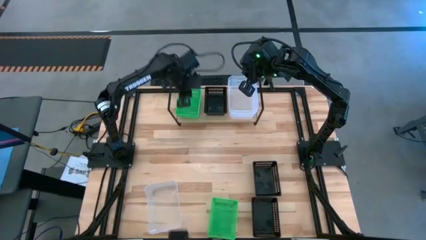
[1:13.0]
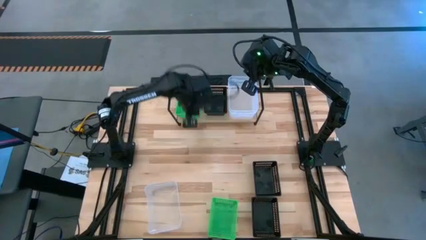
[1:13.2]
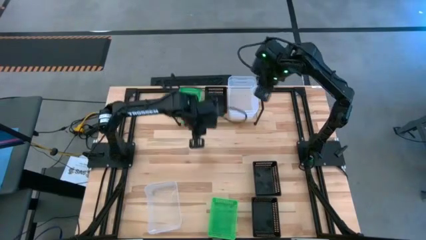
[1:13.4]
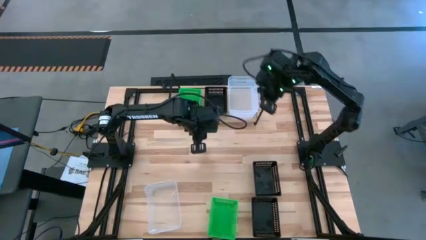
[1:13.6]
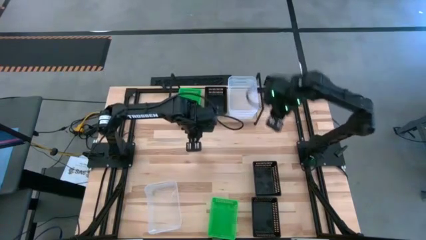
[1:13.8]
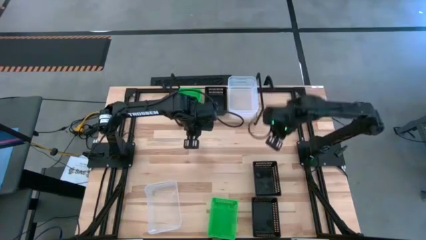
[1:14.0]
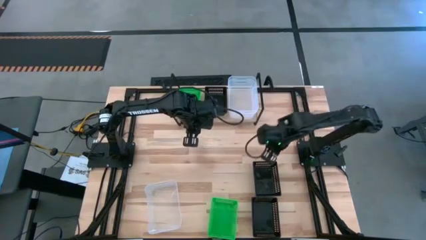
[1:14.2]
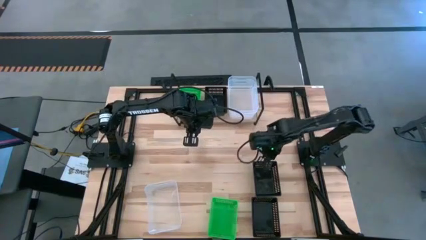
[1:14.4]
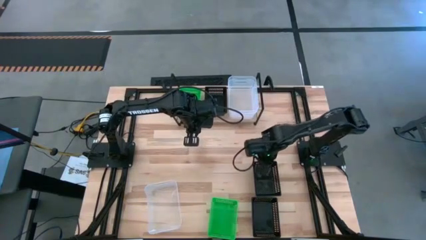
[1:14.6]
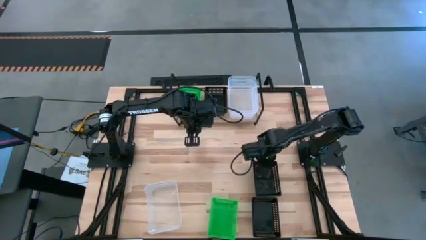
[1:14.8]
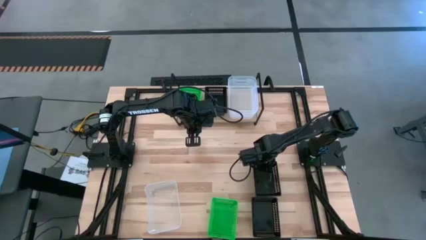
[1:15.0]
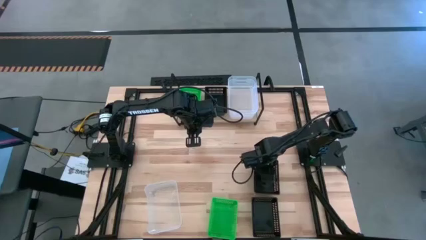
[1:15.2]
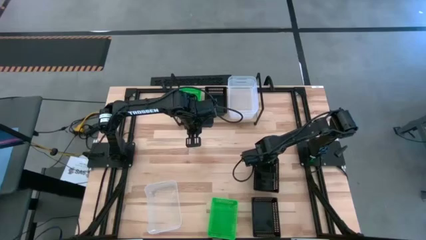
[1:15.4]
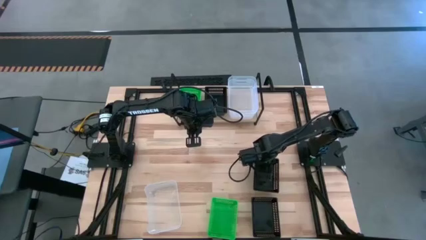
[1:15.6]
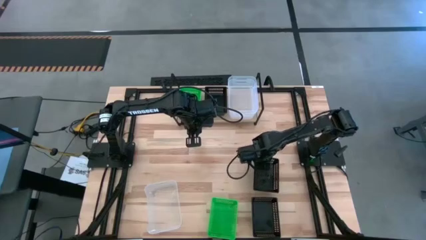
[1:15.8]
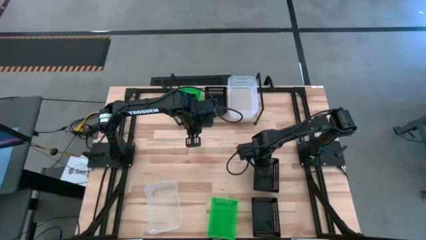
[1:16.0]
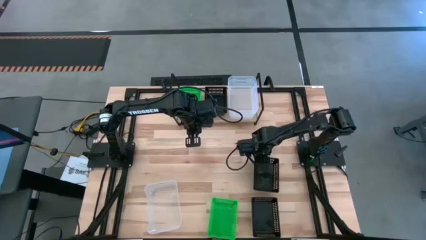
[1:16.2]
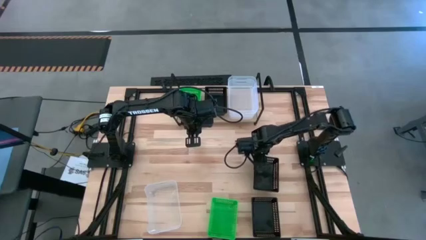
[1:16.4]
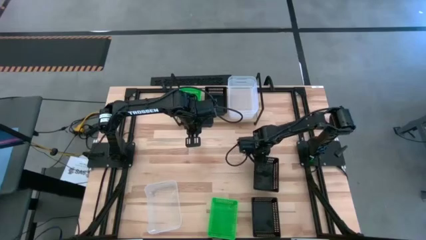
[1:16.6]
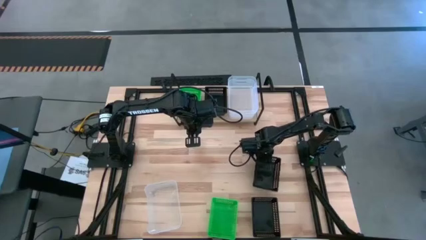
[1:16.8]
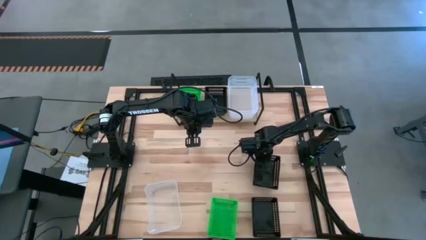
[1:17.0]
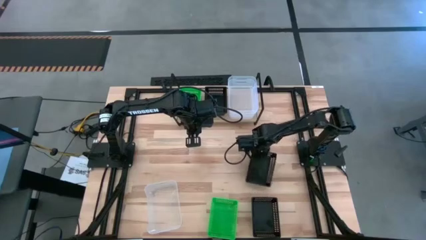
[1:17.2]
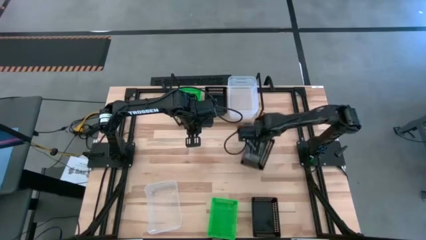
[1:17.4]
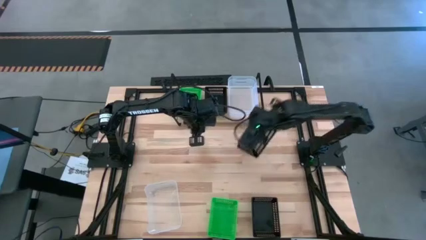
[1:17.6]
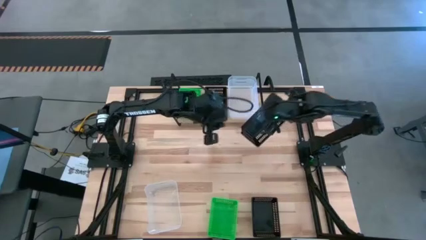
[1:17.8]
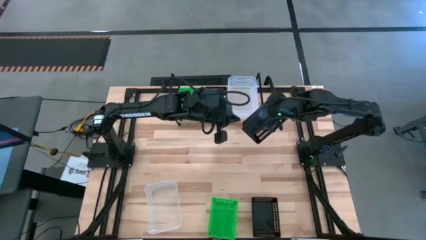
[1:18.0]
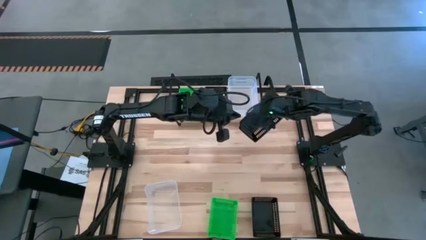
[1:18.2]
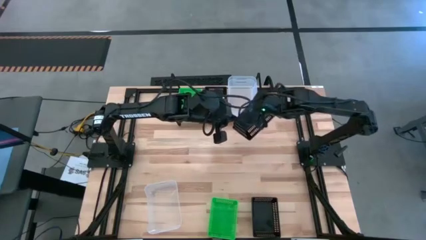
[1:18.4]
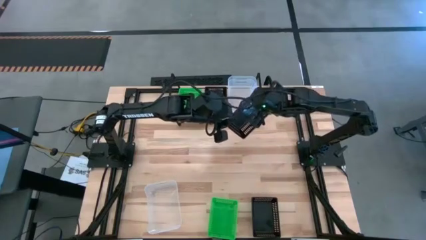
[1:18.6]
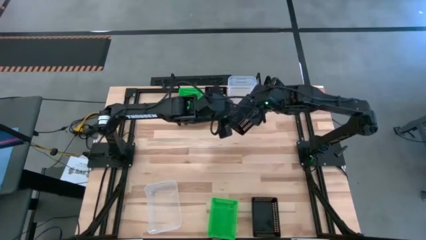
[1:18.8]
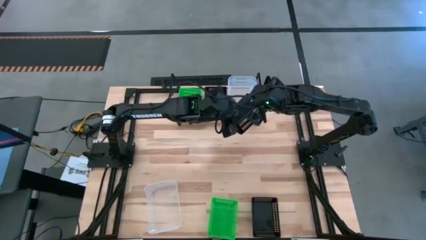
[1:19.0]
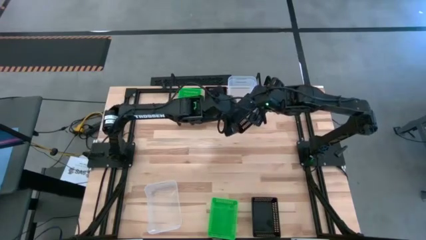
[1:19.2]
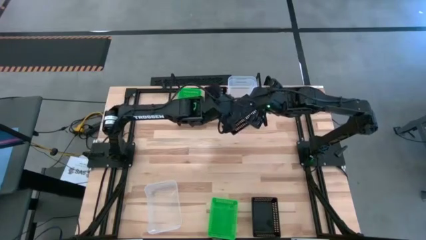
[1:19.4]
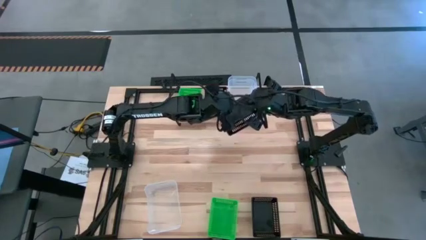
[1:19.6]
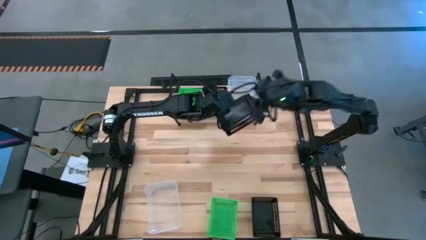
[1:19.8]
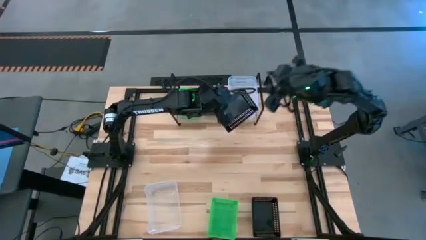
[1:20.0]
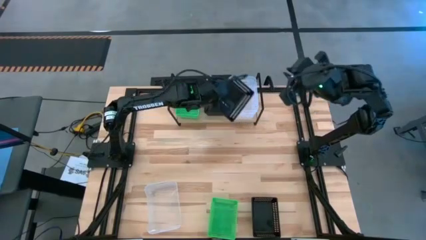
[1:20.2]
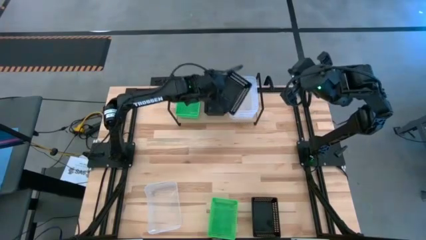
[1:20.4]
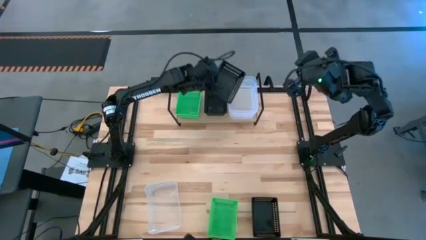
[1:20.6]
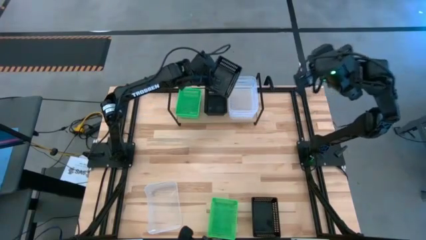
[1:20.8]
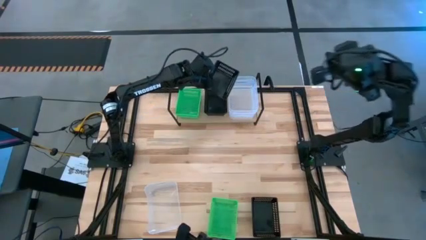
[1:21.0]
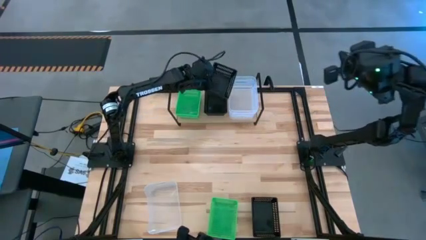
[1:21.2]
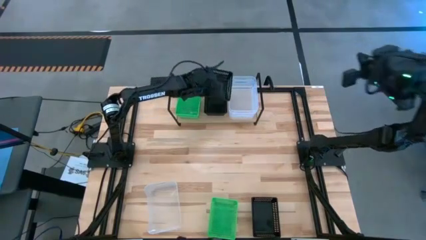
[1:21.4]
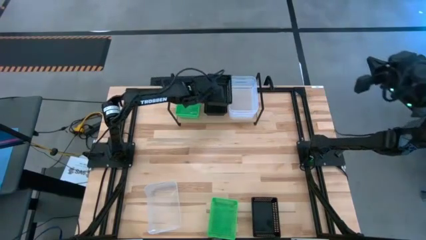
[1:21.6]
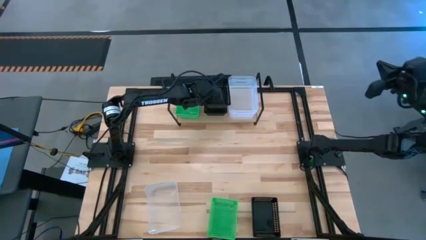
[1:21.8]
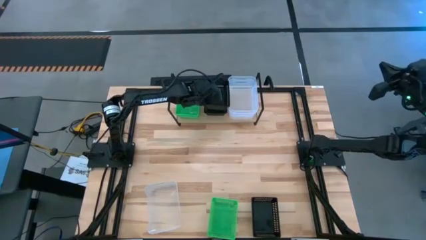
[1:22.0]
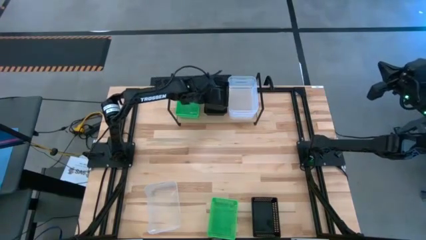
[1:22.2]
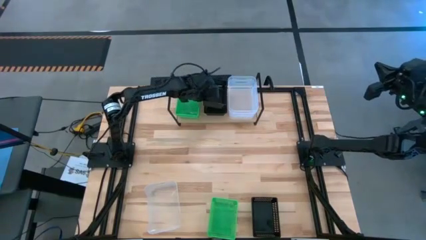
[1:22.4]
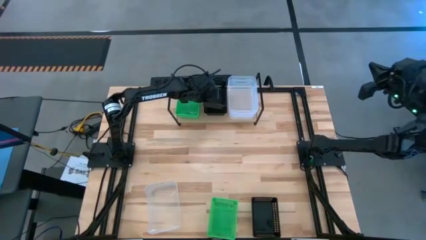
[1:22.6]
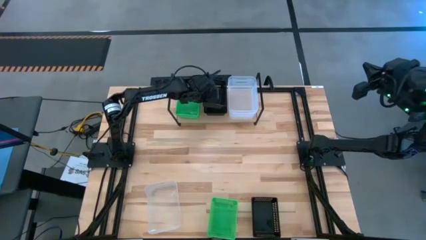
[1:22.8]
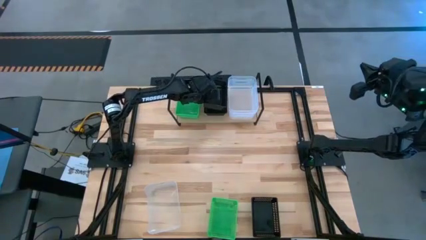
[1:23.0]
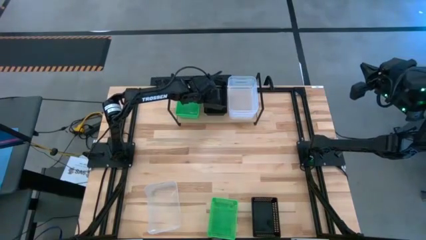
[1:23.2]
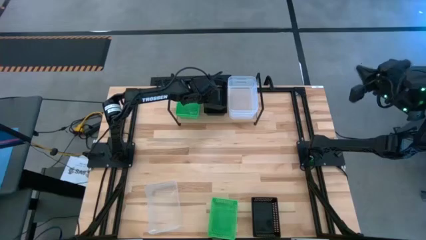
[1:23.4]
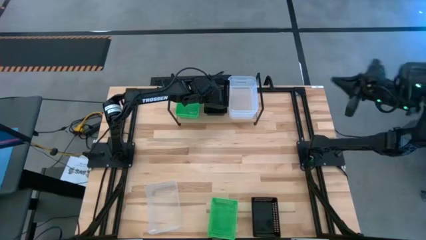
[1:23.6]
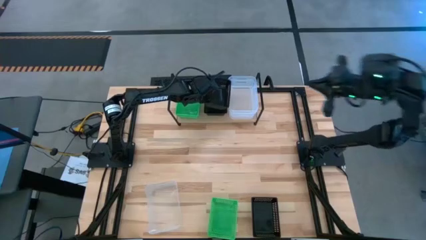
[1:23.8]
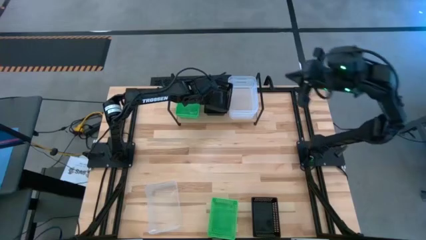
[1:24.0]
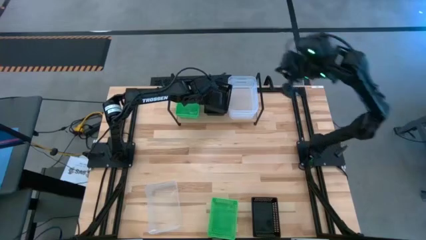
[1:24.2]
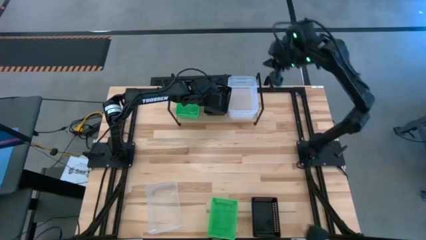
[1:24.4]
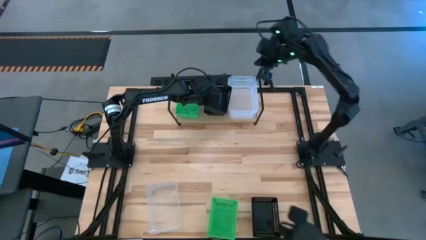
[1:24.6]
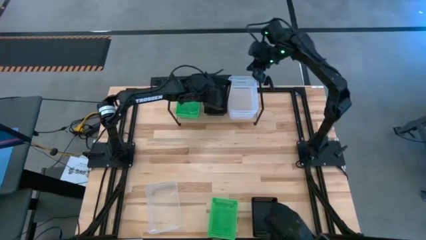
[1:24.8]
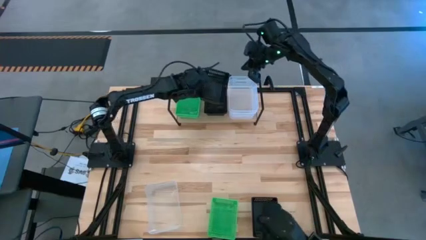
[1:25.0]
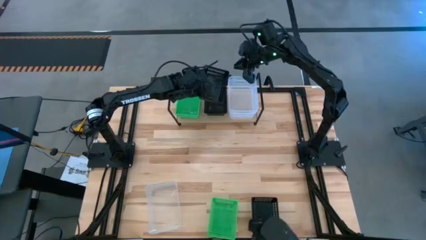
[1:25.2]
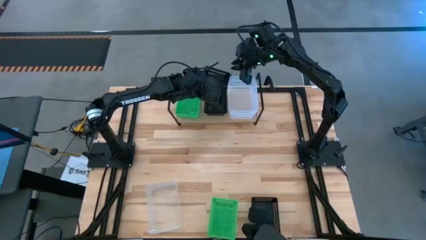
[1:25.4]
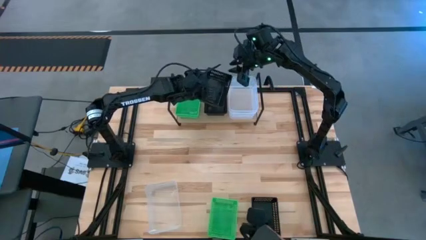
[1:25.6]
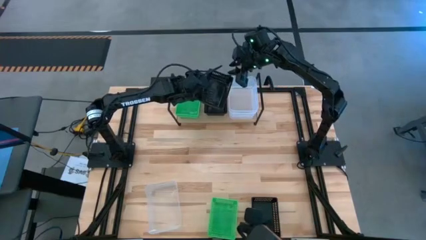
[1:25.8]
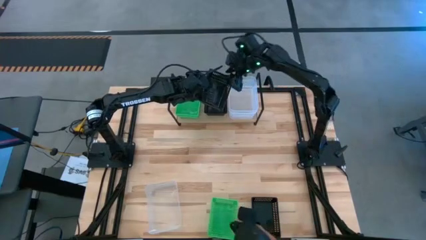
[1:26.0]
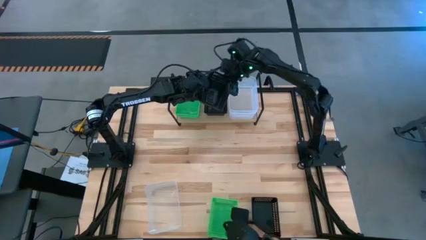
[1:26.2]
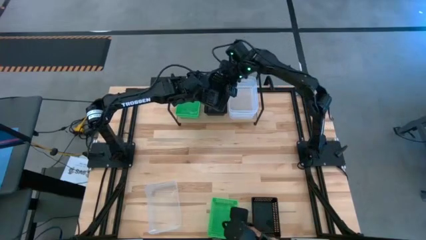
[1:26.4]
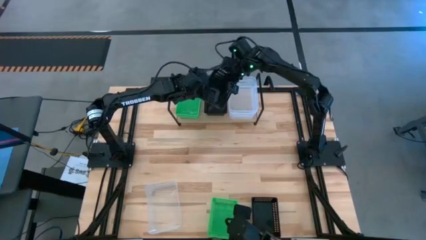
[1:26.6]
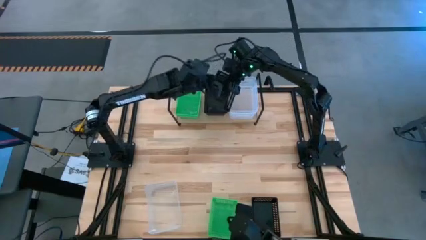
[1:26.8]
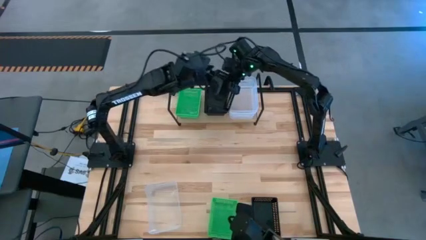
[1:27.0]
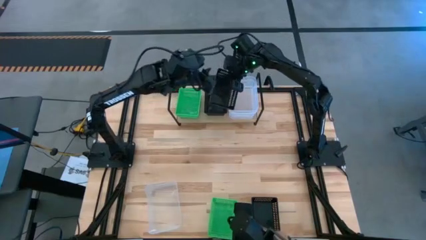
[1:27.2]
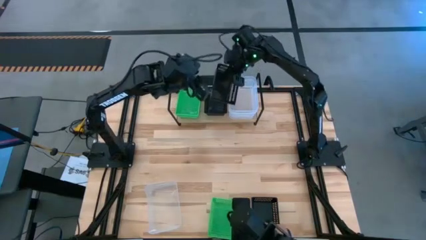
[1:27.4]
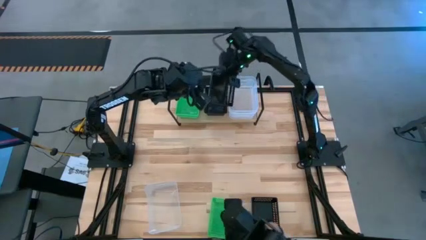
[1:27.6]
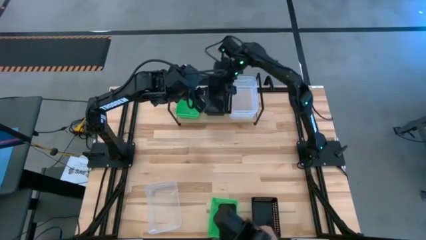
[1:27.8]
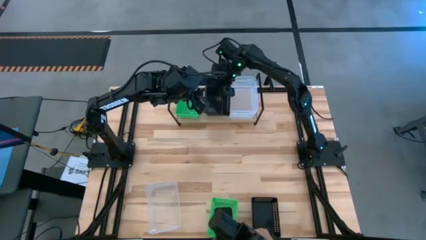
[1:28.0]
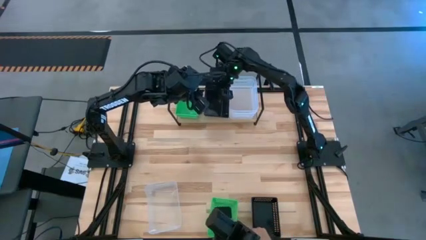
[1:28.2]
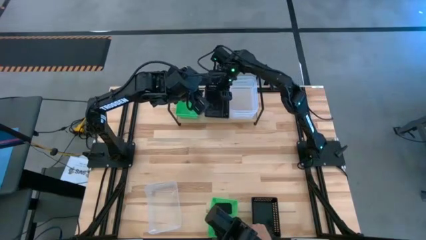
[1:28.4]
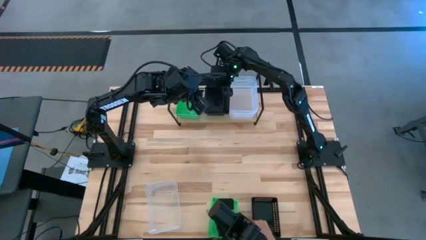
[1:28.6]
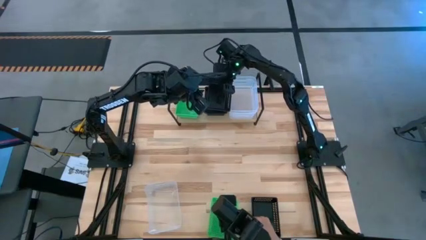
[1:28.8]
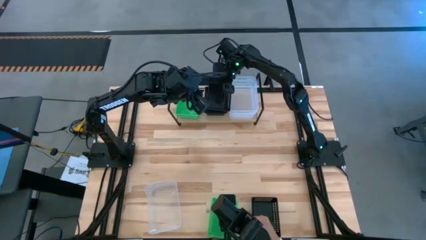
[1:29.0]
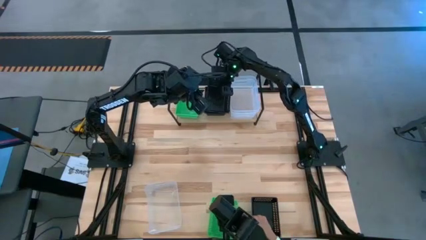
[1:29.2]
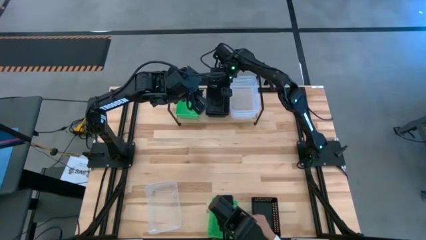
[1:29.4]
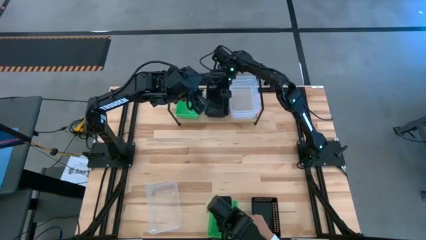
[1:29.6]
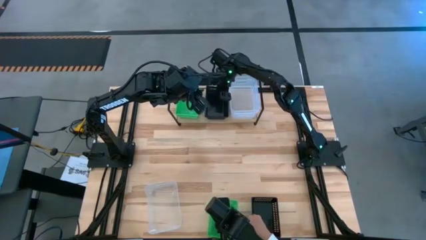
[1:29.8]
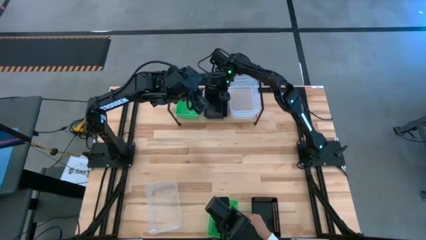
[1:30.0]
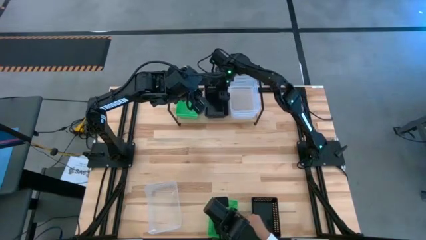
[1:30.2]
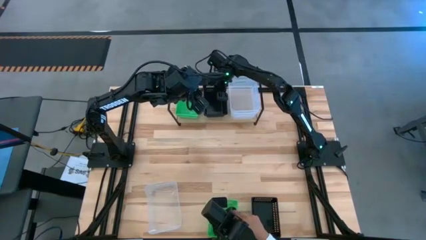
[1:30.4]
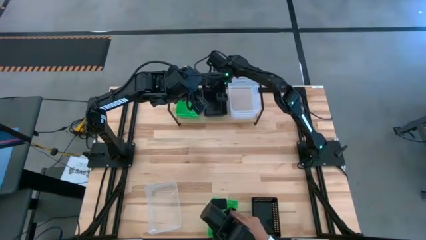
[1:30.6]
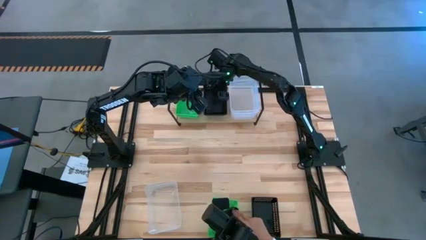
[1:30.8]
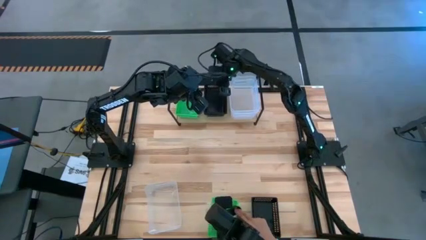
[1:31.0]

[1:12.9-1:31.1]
Task: Stack baskets on shelf by color
Stack the top black bin into the black bin on the shelf
